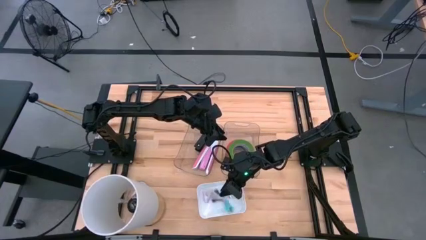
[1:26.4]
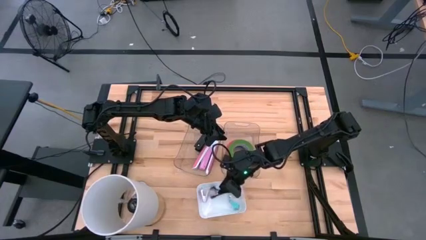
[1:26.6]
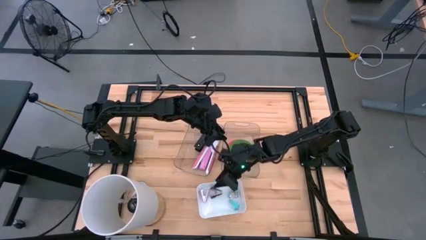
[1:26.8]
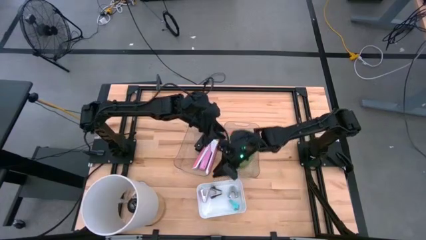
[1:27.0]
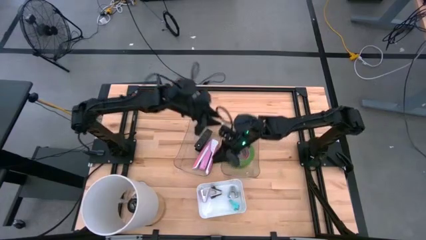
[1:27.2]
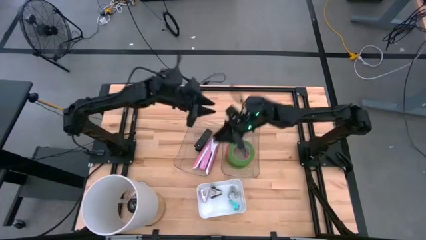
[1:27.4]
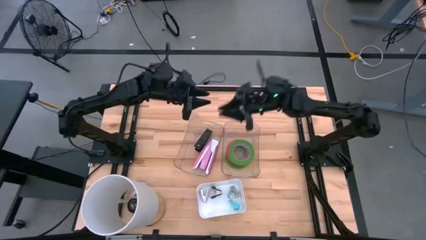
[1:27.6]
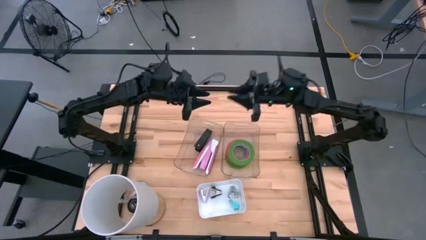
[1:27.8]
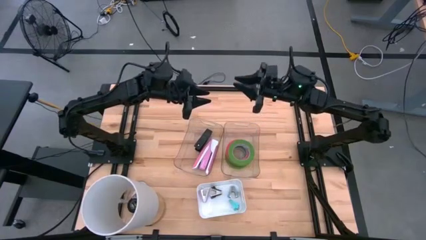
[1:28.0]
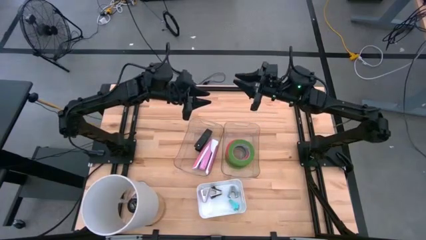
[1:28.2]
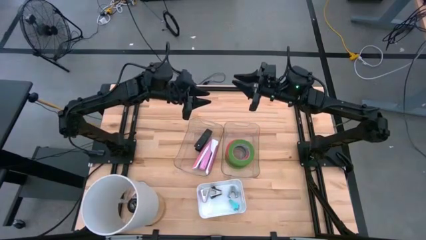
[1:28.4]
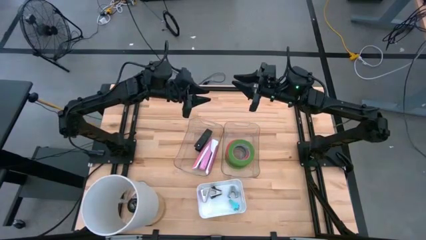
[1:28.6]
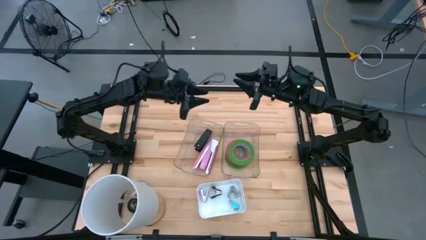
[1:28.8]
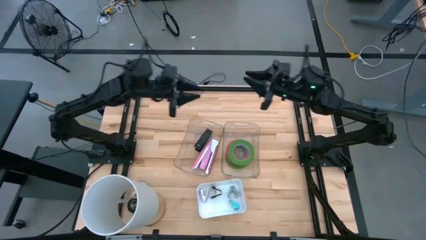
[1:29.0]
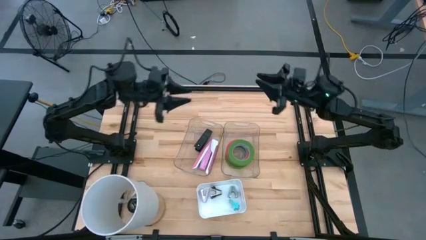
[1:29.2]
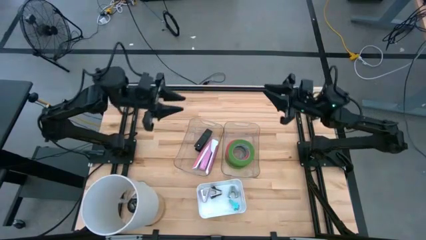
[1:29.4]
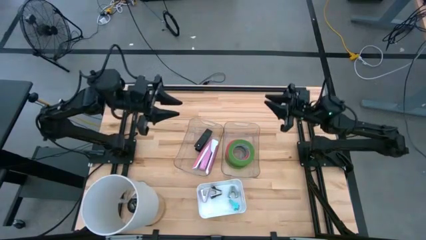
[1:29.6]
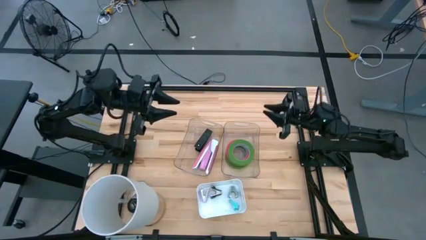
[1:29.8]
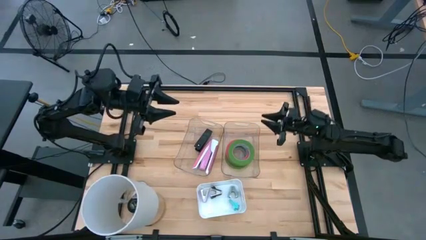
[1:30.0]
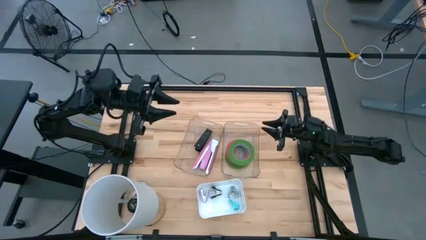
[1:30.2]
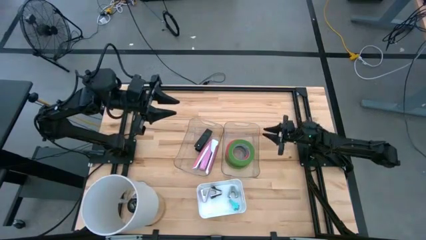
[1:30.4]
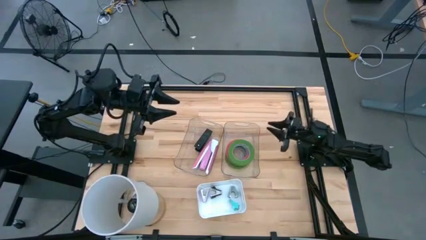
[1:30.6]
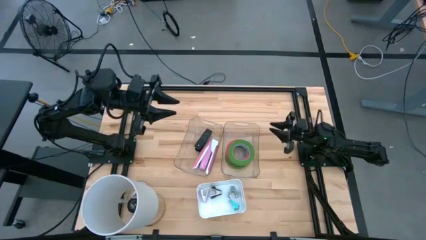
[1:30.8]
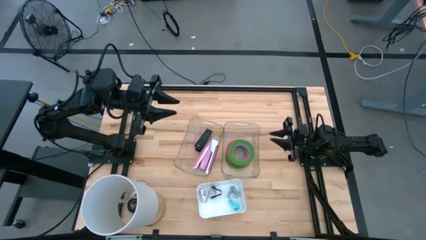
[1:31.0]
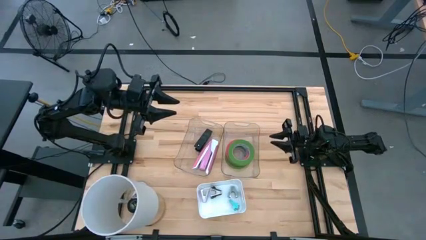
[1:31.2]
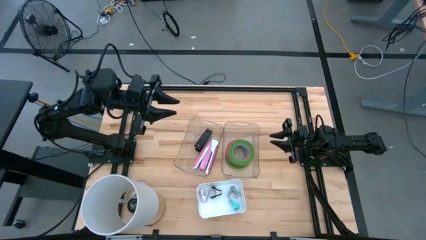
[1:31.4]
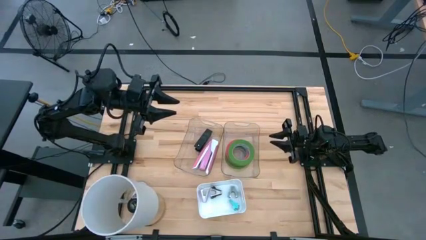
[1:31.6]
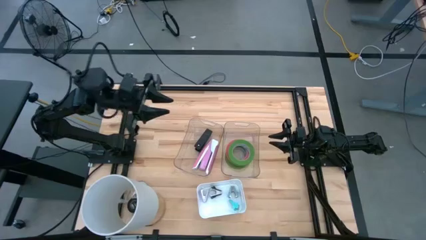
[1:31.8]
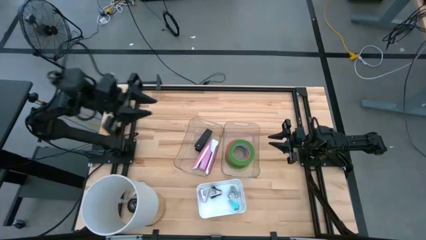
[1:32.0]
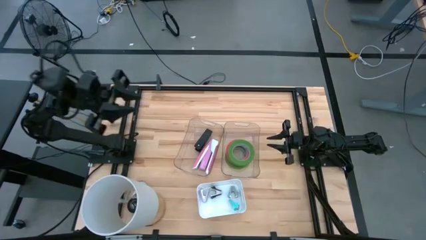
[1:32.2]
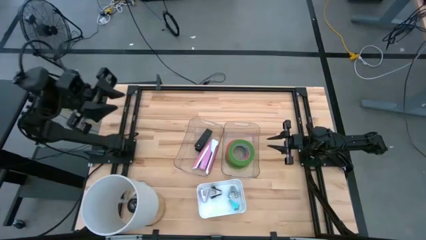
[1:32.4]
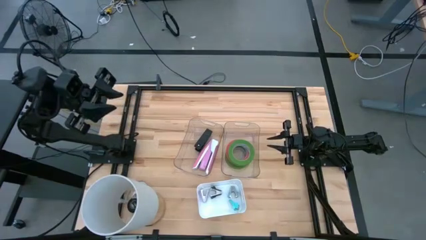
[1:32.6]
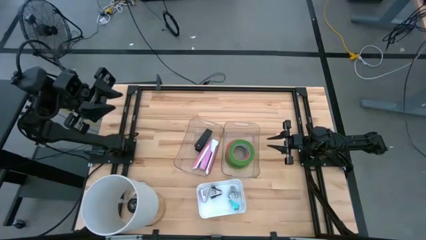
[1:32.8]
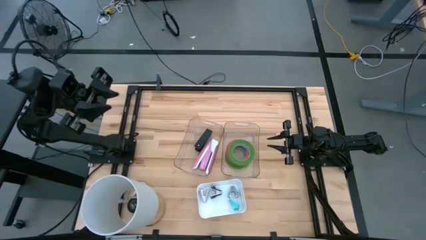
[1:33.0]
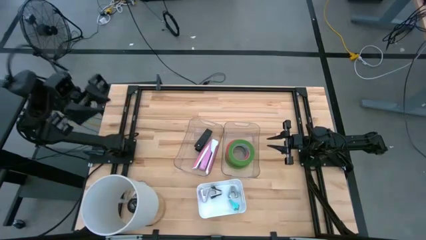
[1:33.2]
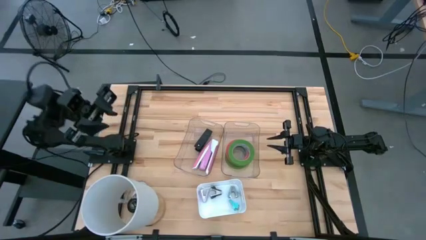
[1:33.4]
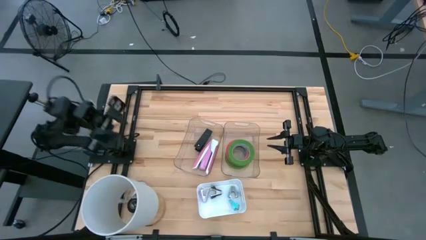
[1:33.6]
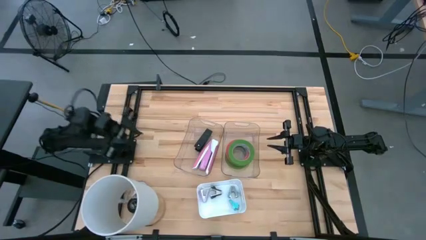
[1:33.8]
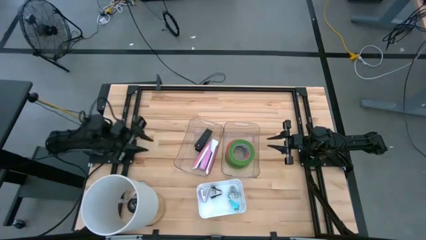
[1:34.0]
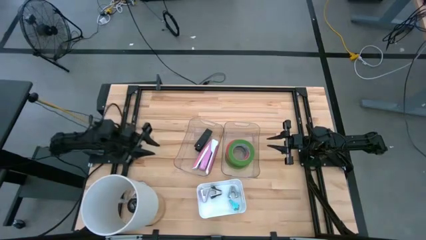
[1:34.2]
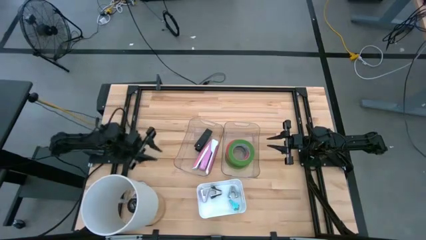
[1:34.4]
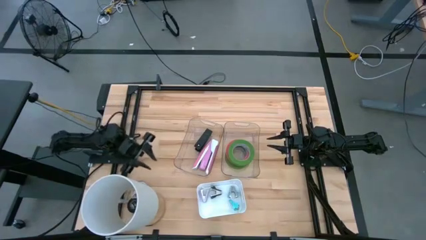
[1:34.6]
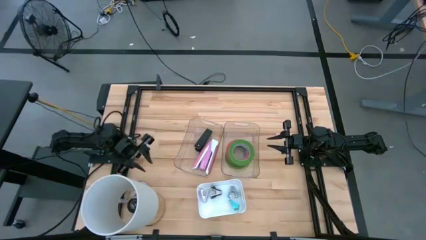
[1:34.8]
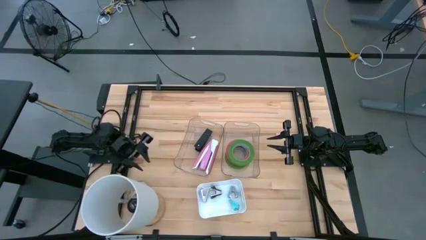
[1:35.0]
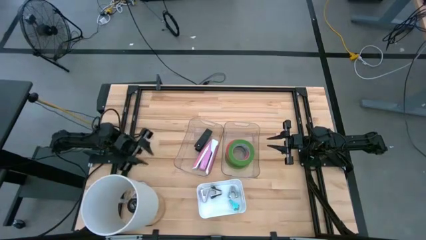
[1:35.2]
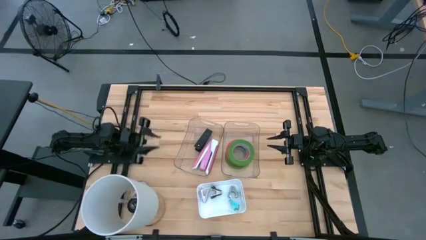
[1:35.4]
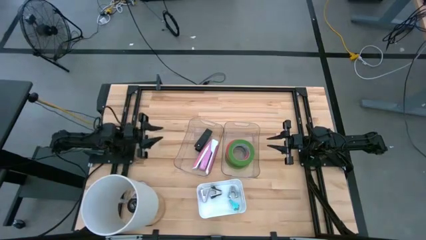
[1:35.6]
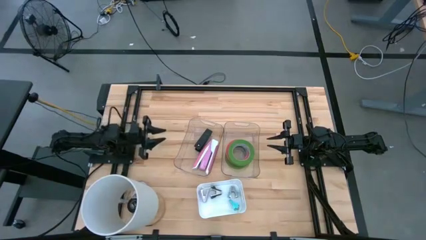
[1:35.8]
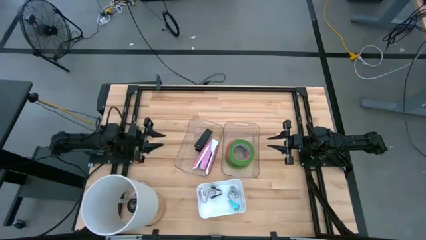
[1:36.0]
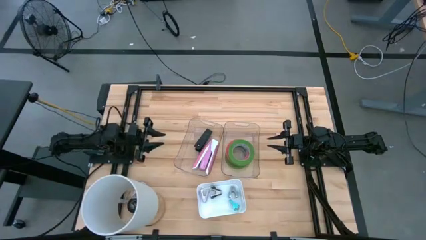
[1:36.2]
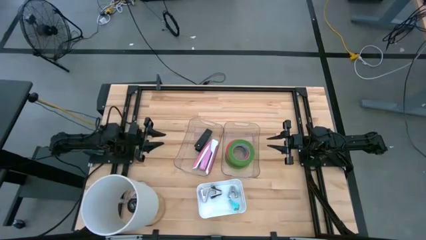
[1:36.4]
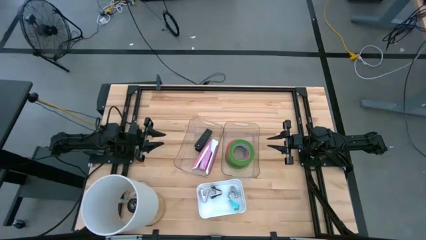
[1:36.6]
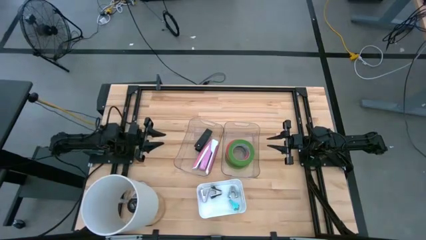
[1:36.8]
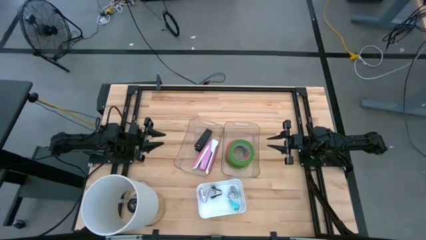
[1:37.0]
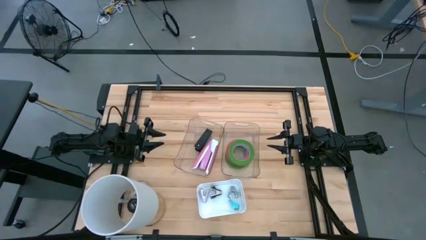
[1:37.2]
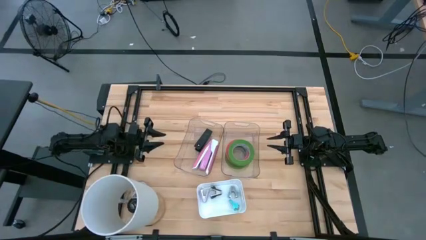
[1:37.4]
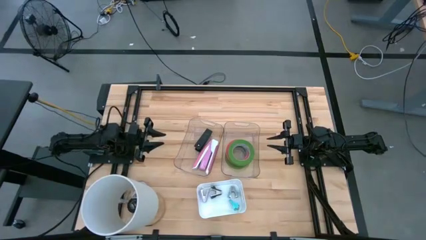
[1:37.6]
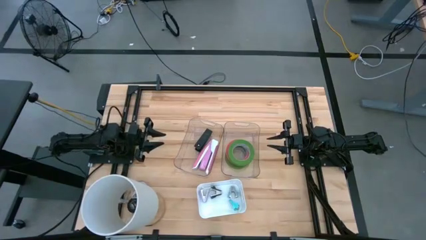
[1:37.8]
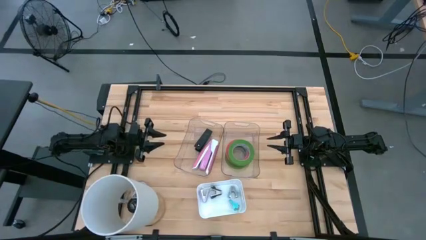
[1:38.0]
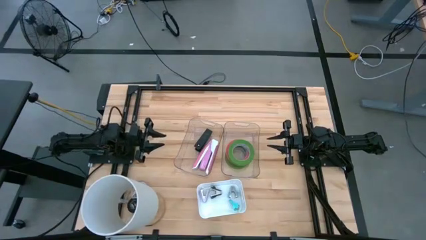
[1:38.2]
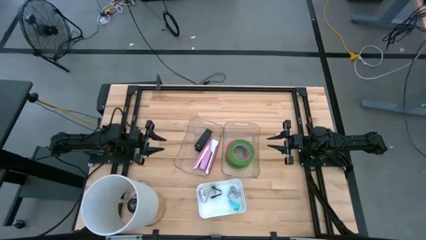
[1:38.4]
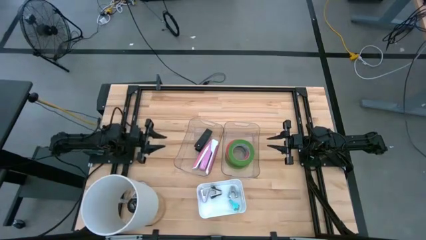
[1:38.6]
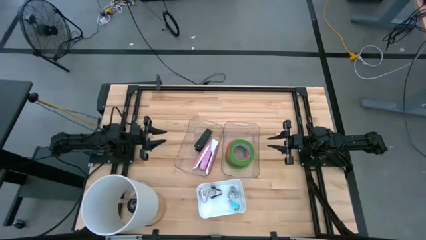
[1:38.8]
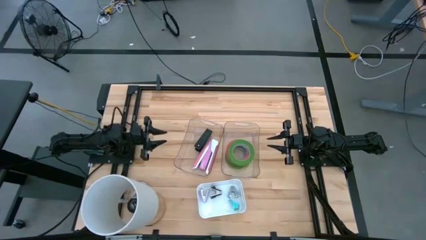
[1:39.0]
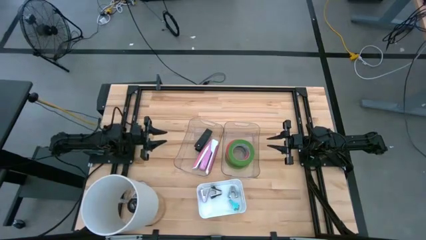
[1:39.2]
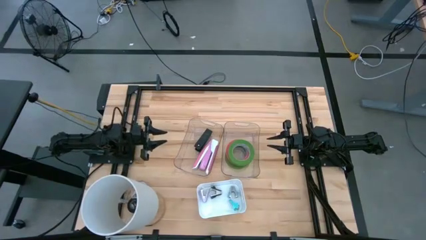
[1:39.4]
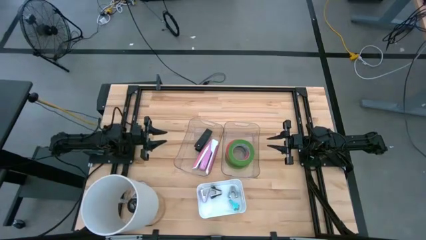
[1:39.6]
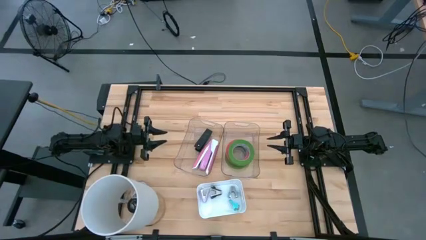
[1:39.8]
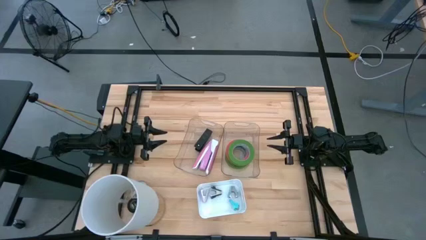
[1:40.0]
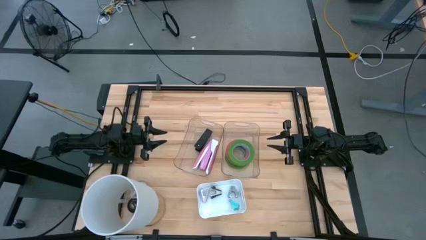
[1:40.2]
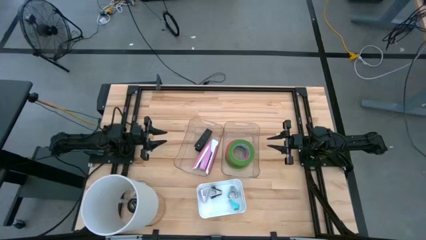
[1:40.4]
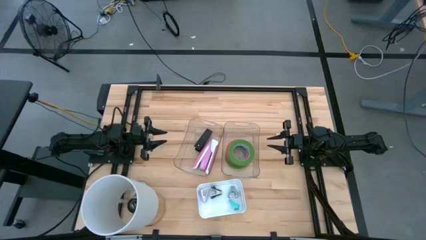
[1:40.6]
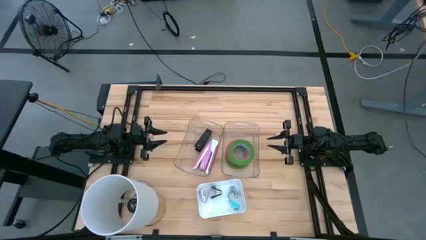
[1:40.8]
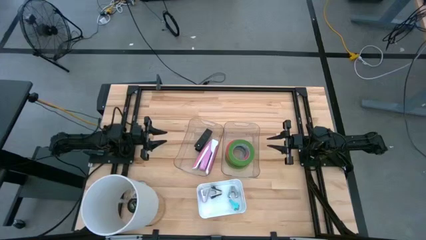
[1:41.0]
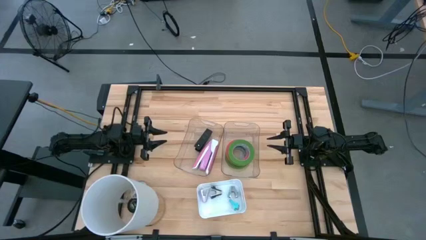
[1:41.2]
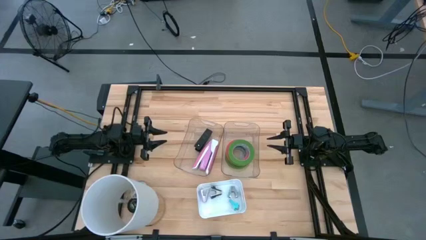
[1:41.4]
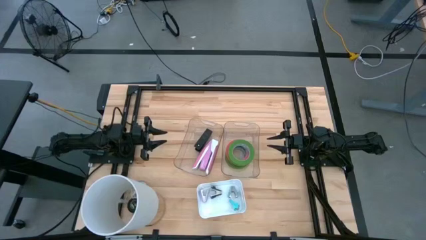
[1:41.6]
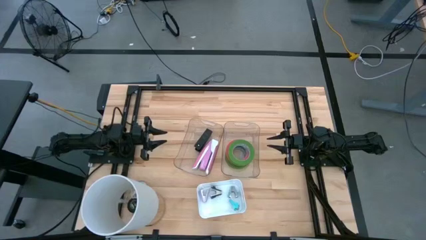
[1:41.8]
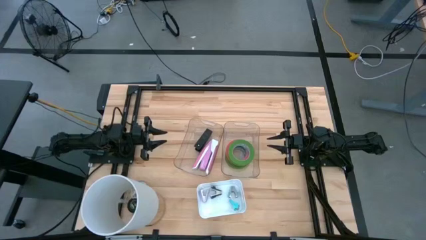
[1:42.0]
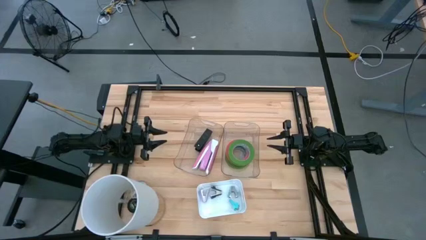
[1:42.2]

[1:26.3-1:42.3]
Task: Pick and place Stapler, Stapler remover, tape
Return to Home Position
